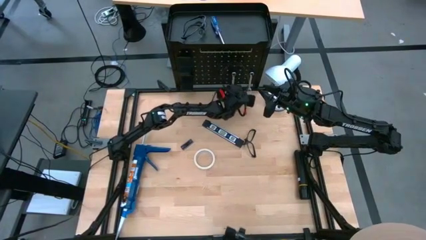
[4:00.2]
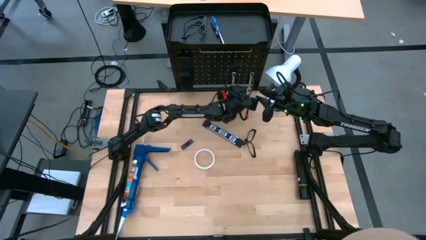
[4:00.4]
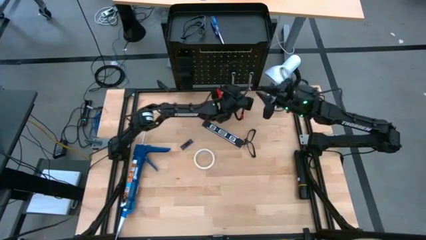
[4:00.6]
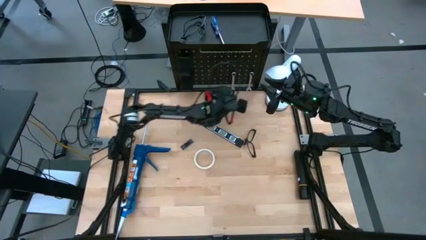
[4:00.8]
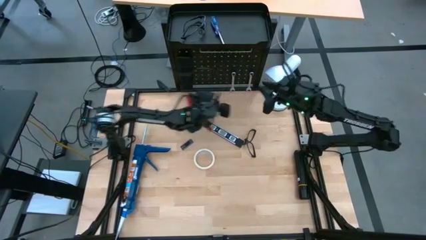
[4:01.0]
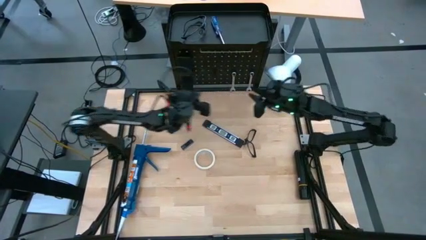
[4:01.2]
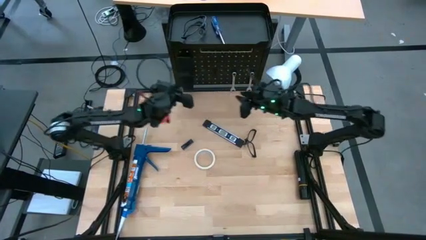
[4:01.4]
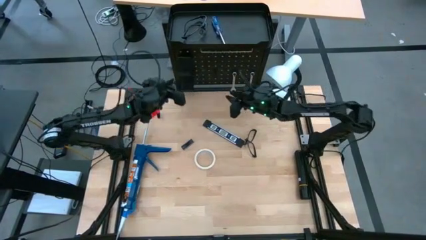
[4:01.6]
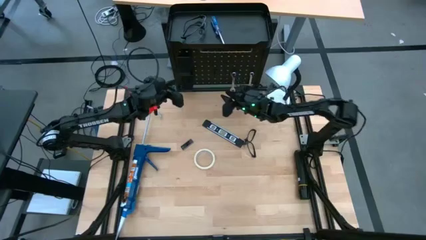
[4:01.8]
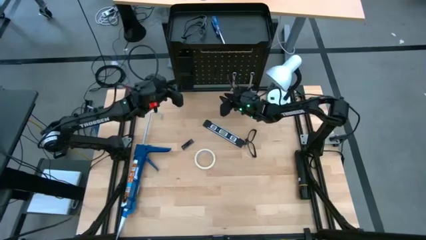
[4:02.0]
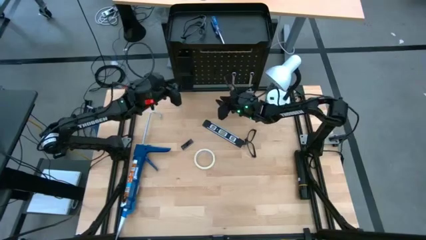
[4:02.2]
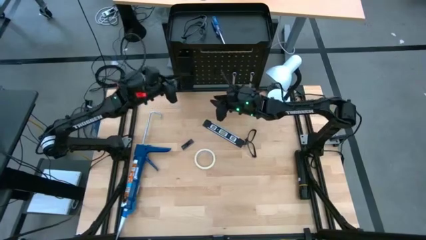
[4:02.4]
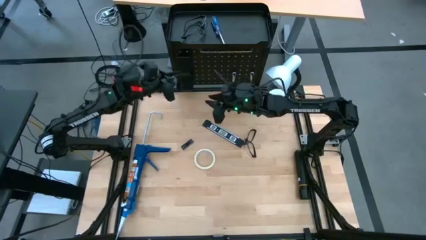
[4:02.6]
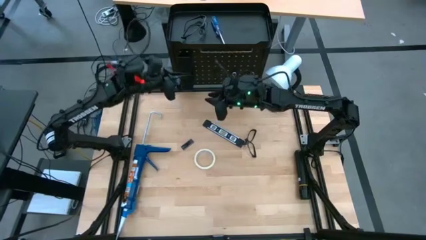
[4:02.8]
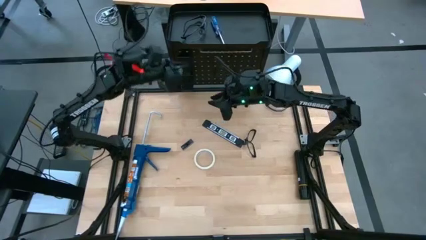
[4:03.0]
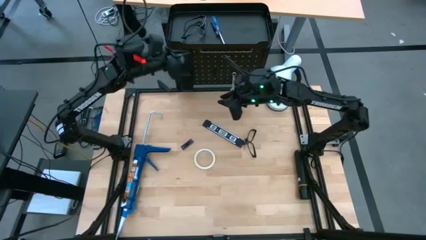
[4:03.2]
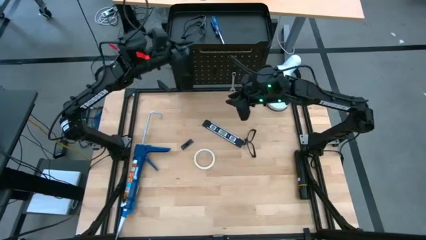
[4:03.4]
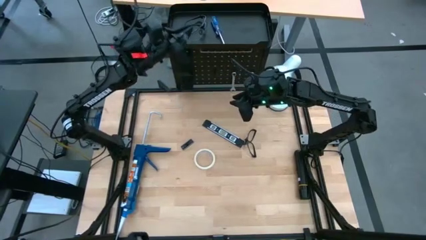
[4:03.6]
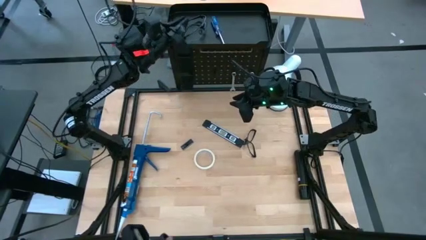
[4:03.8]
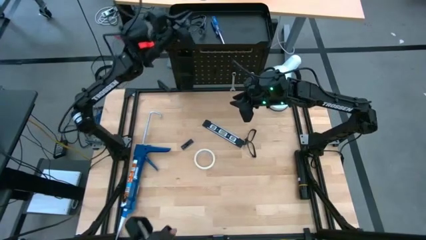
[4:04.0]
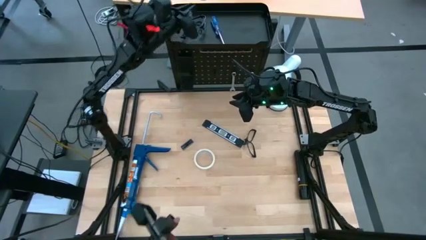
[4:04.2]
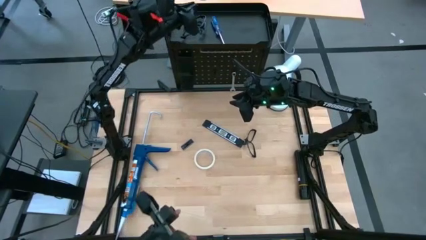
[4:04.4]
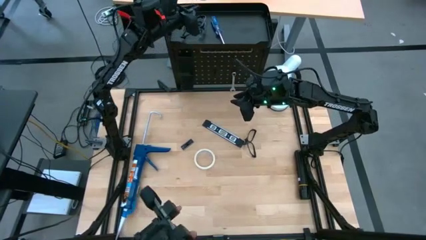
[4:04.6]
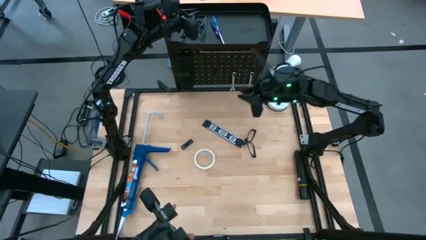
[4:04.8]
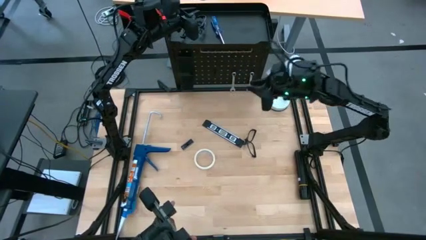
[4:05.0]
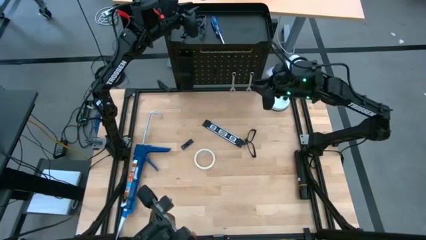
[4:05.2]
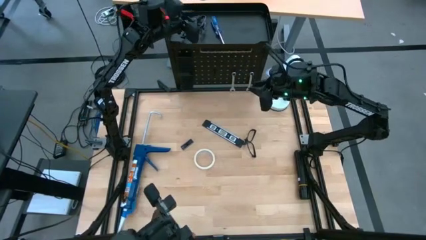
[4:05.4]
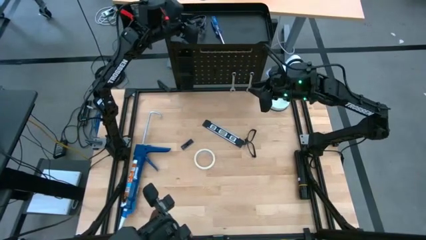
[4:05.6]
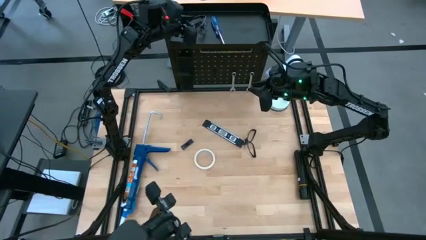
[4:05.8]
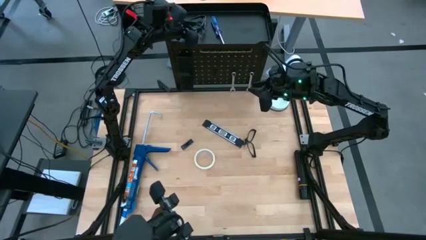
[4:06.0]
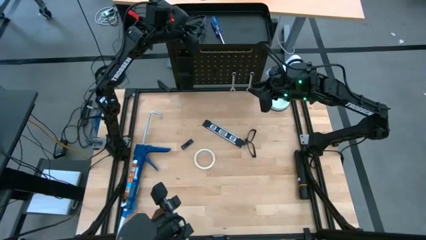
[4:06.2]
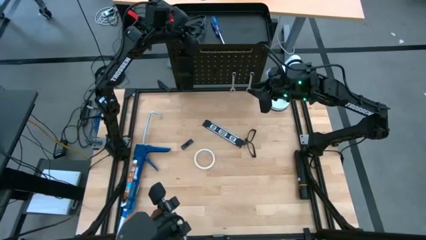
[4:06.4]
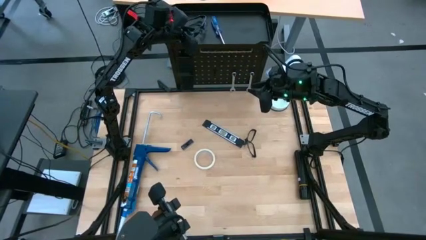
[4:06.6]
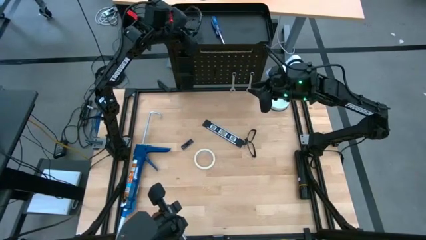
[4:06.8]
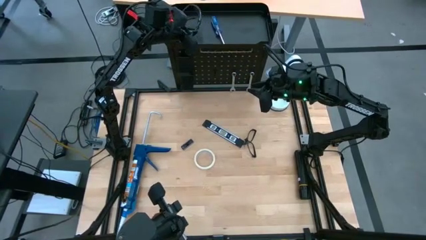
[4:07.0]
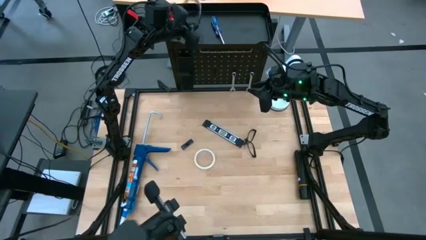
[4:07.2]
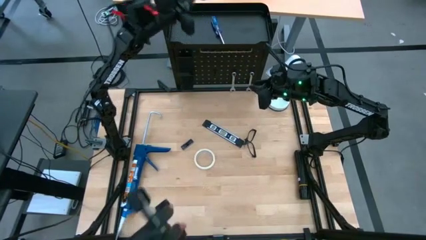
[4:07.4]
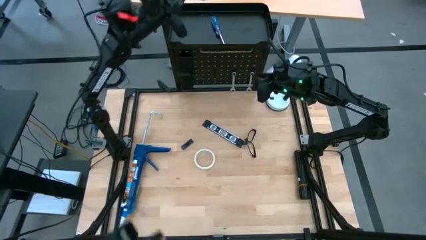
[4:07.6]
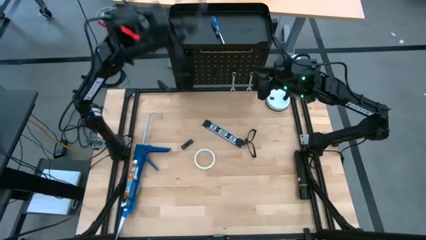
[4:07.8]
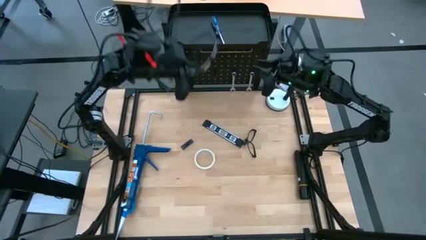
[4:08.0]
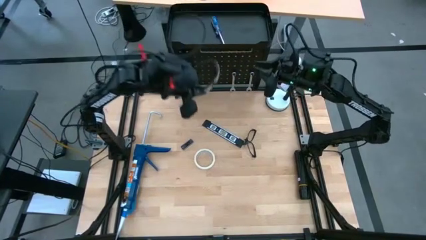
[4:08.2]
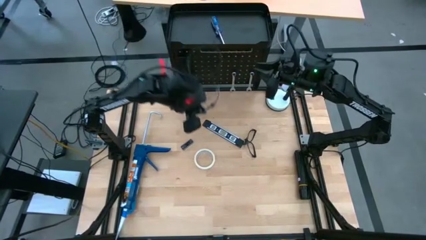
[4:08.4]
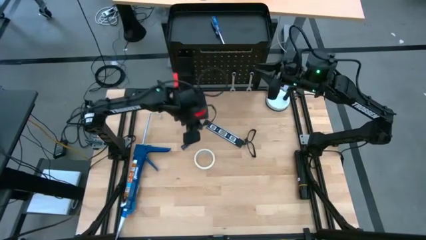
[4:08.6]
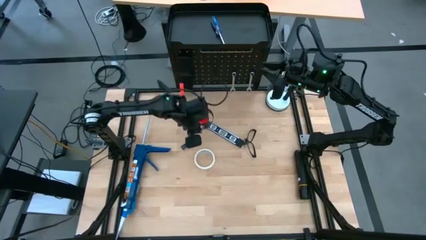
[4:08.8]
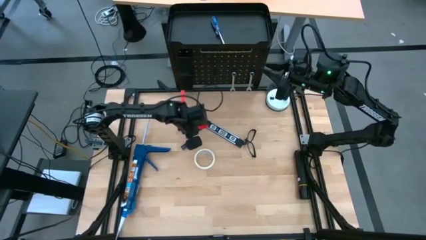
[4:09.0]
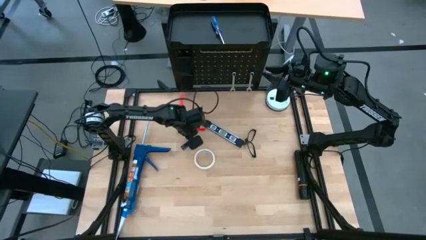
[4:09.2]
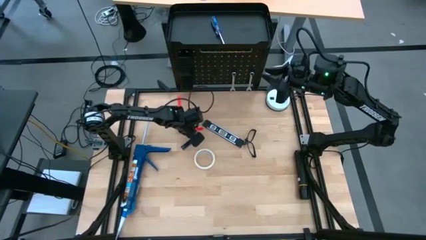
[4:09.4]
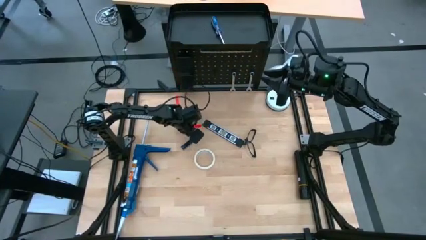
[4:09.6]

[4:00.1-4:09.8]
Task: Hang tools onto peg board
Remove the safety glasses from the top of the peg board
